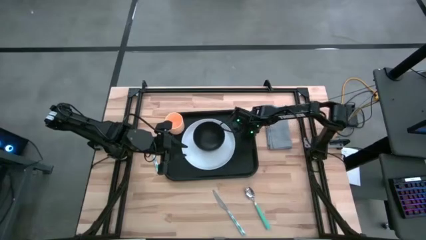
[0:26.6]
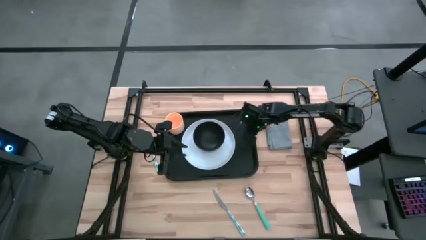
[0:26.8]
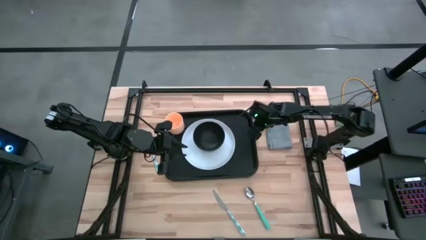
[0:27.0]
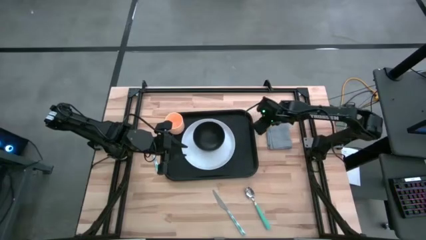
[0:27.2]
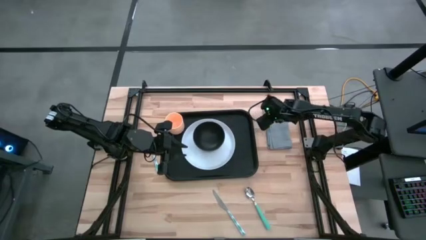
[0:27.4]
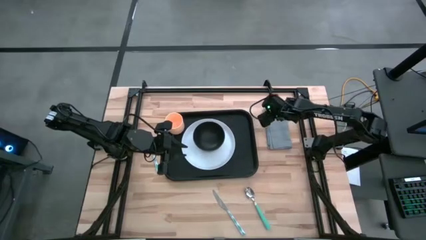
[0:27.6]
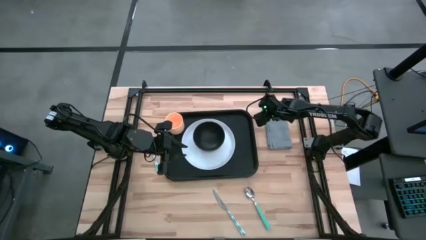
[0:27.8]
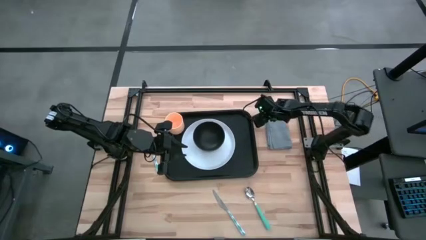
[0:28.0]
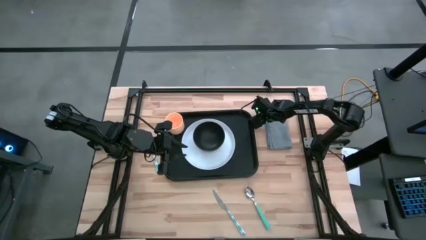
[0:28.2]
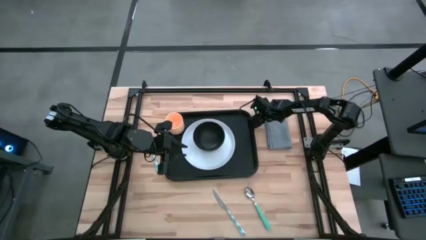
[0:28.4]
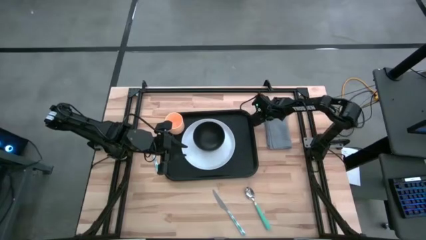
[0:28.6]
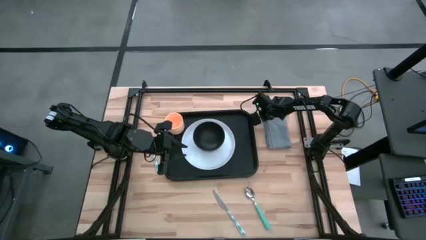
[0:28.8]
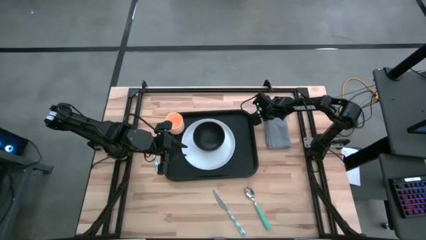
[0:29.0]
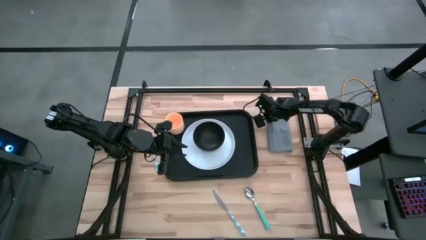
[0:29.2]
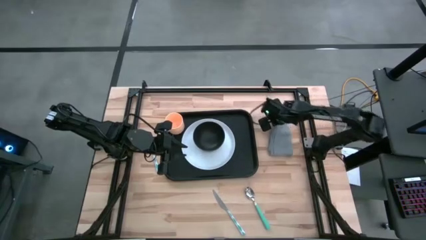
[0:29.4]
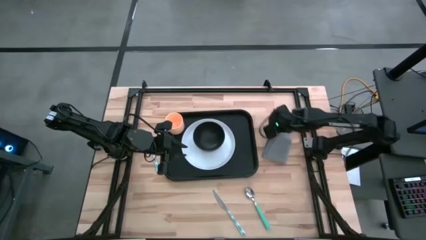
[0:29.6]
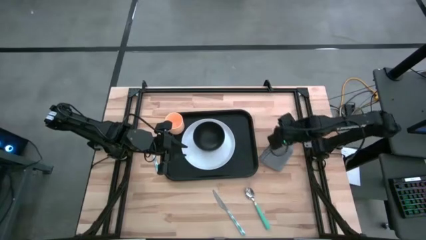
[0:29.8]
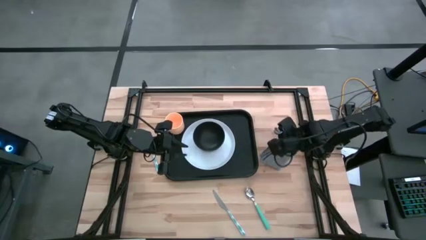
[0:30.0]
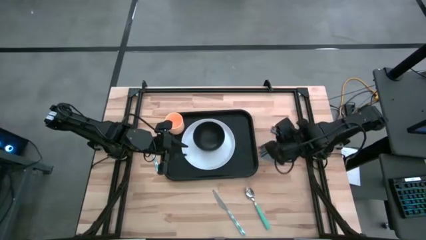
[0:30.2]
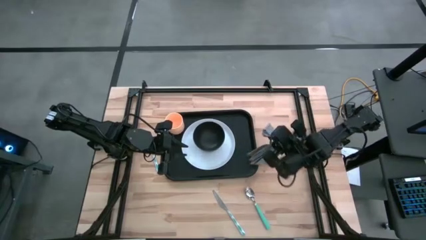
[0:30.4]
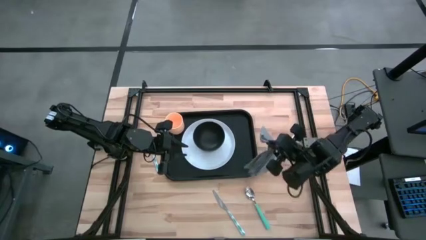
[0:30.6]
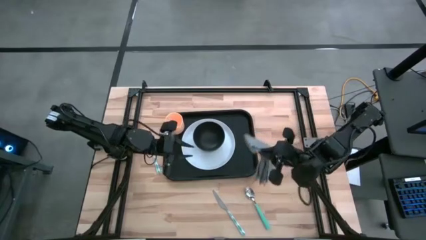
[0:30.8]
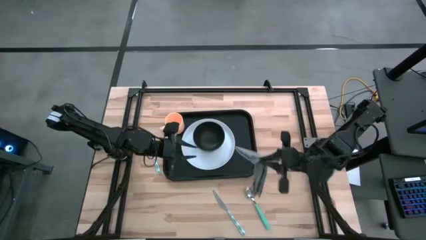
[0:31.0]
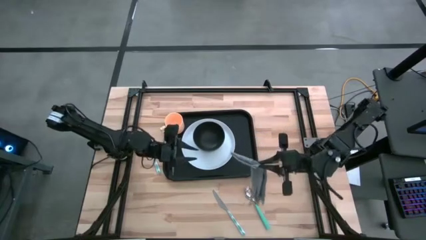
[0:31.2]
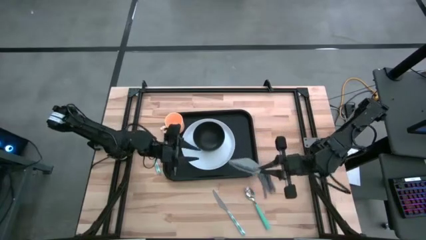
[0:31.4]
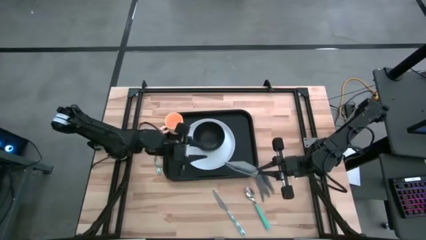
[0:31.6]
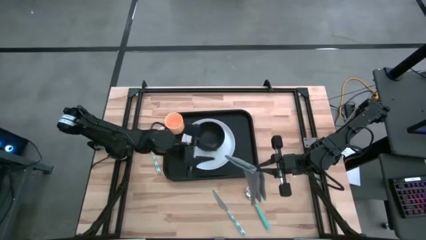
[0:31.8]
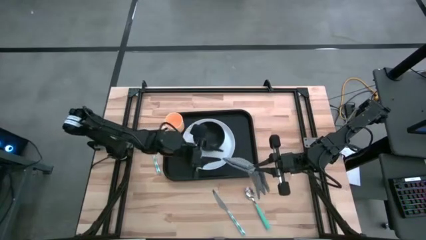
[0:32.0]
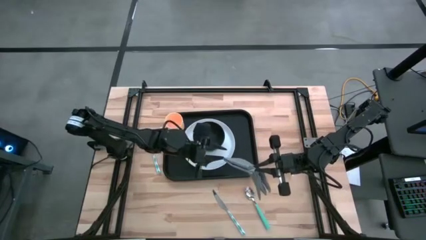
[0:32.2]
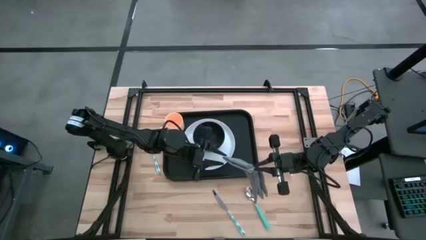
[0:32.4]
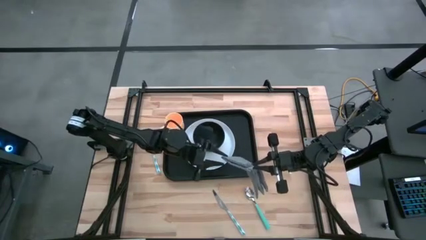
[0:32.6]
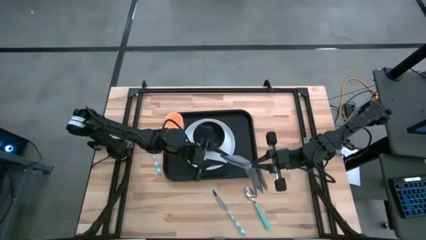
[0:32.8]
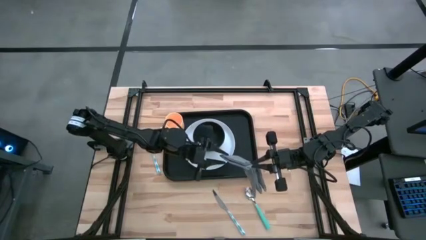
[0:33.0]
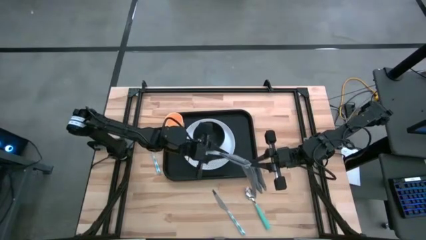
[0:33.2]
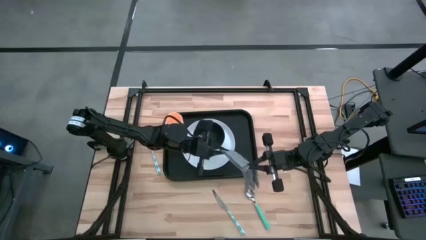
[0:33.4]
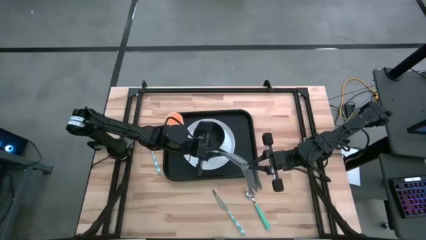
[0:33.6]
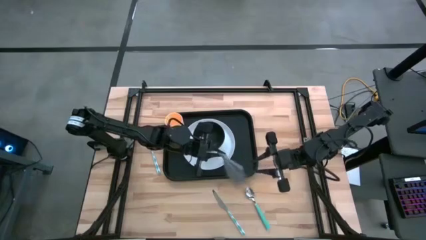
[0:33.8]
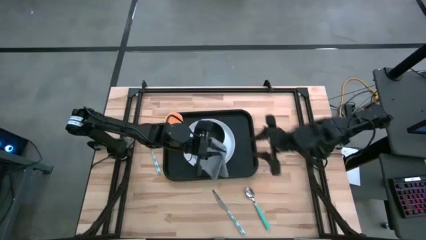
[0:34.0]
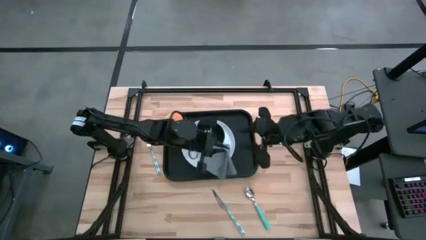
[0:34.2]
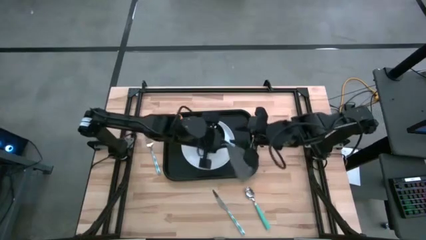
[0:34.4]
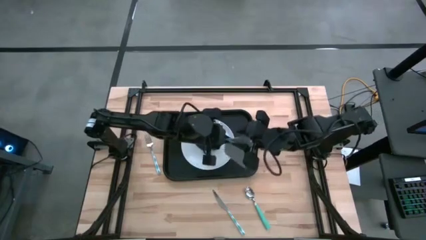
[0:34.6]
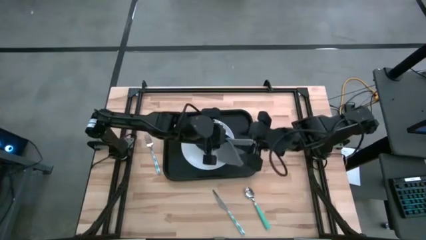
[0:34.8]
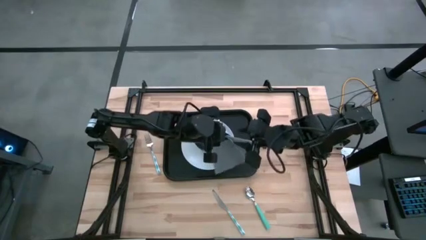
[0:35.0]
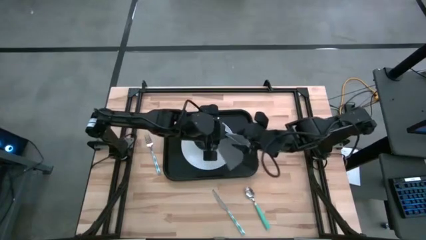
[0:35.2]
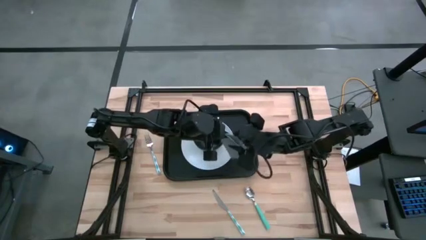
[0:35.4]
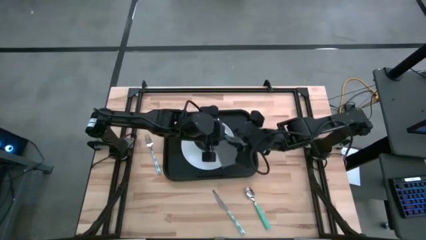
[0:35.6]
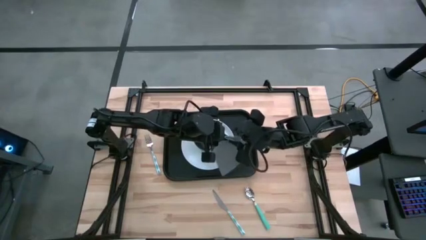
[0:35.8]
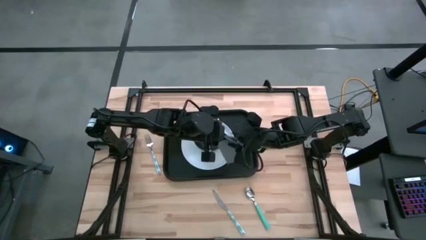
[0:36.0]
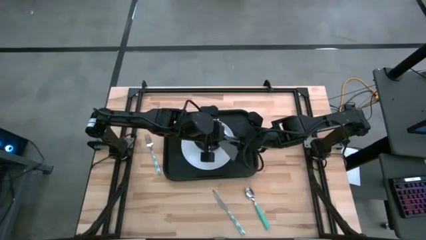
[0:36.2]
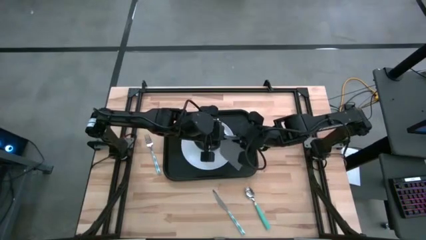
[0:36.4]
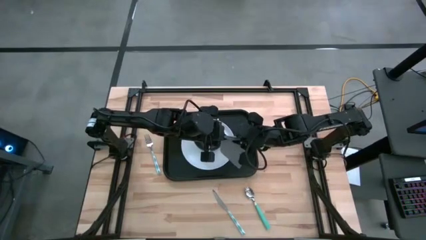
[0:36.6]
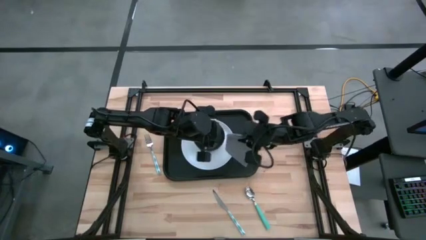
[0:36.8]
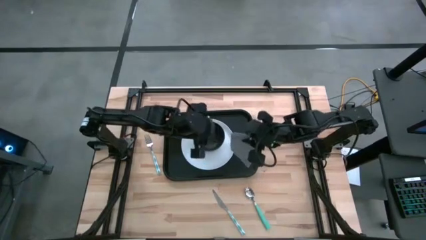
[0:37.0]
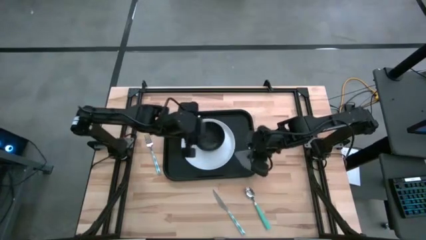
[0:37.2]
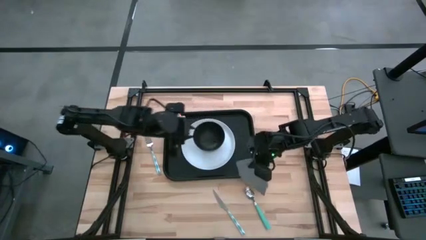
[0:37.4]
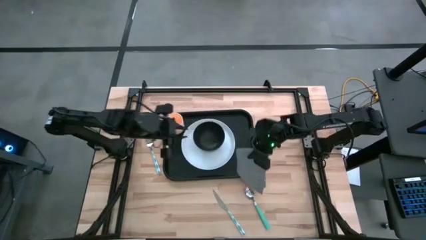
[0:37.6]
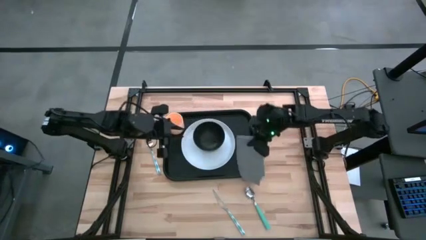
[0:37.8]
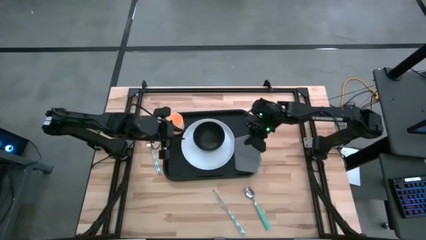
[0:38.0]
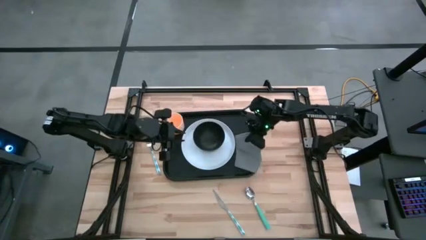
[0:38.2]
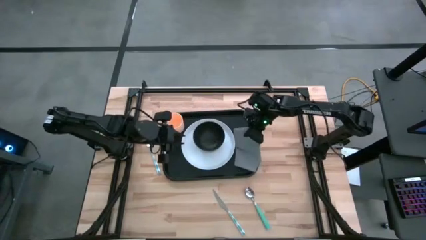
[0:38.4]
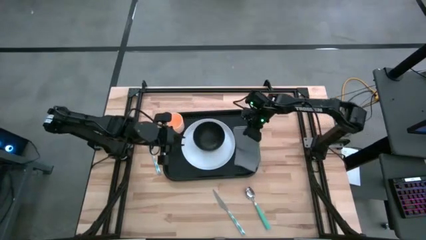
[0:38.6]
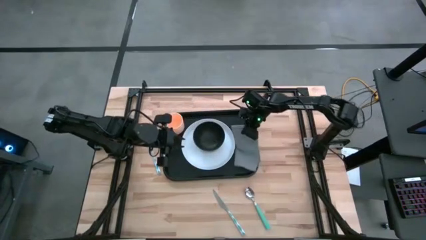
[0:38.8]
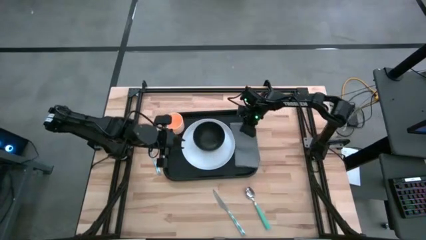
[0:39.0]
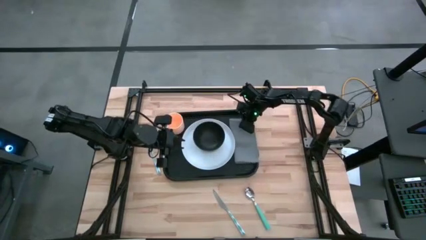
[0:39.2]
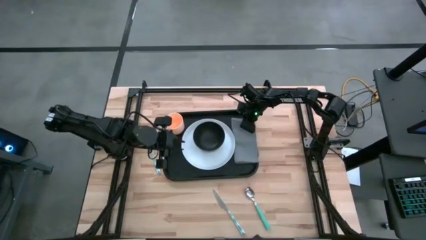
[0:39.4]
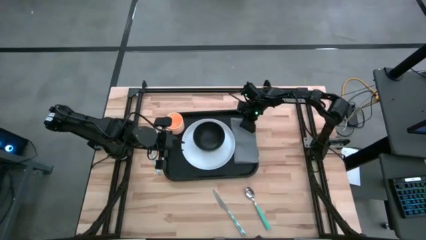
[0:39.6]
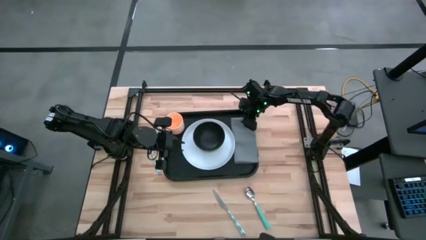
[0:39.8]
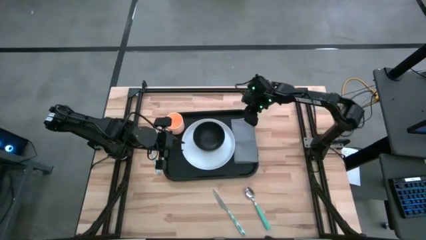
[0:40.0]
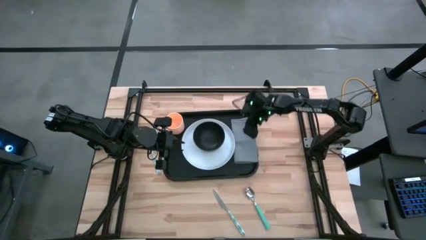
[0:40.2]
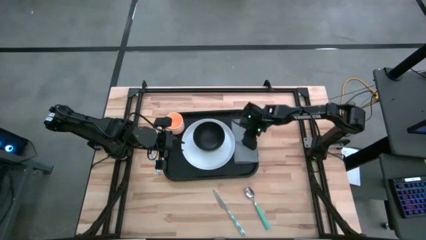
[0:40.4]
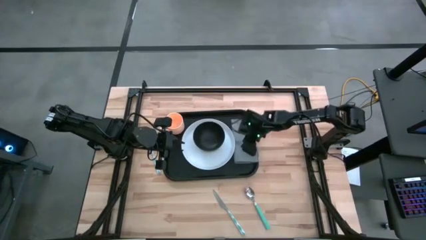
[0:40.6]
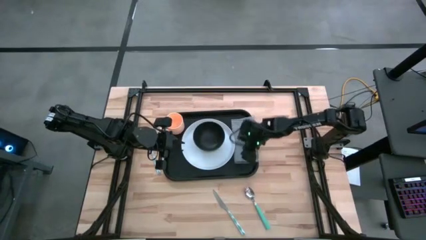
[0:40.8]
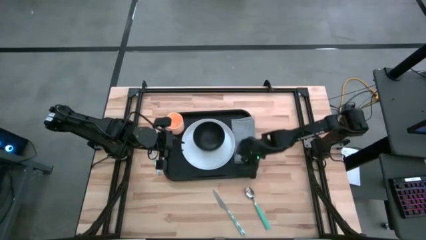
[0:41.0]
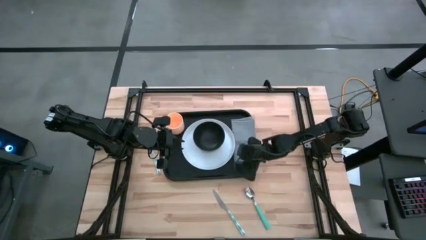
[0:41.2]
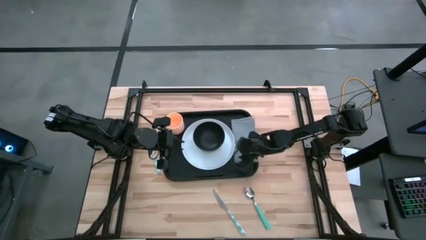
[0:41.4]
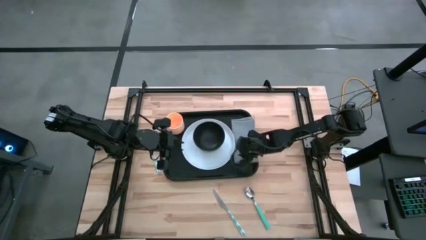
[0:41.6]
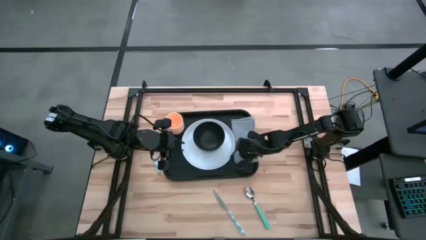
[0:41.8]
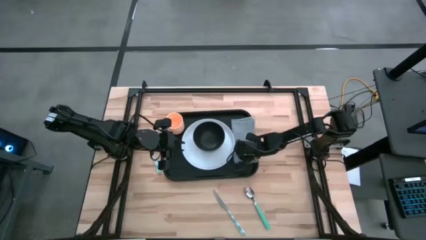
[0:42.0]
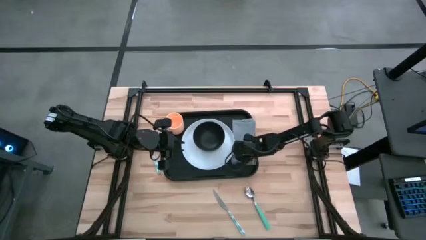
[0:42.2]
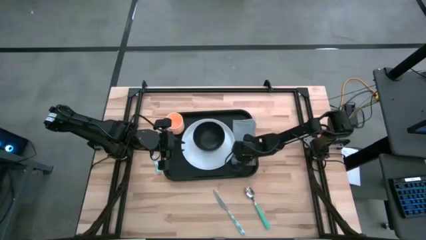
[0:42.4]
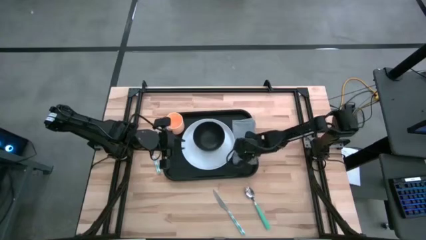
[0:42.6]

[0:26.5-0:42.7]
Task: Set up tray
Put the gray napkin on the black tray to the right of the white plate
